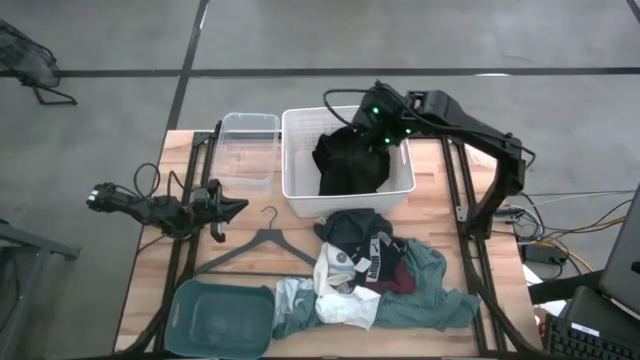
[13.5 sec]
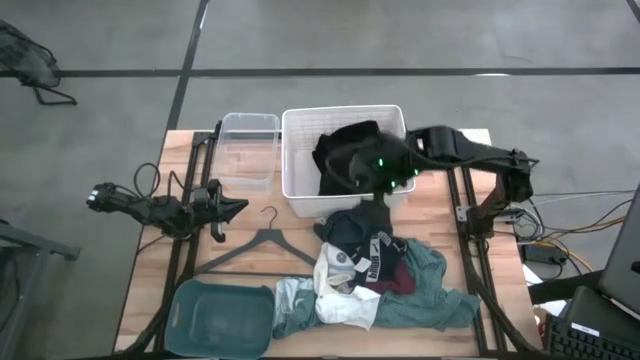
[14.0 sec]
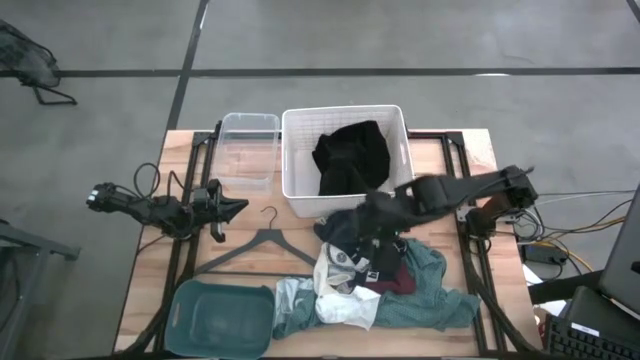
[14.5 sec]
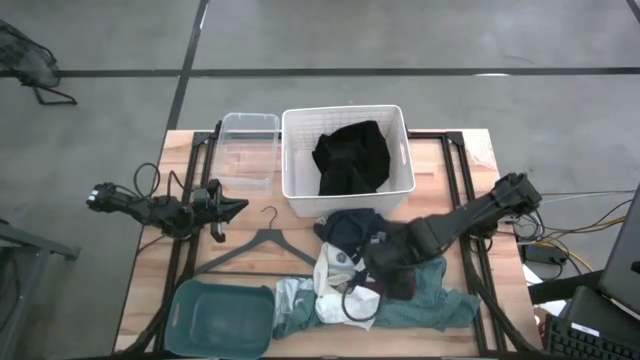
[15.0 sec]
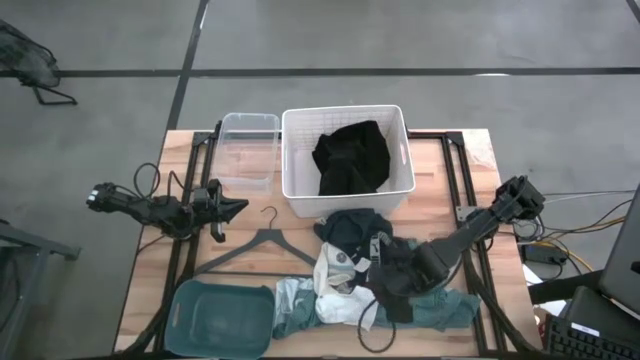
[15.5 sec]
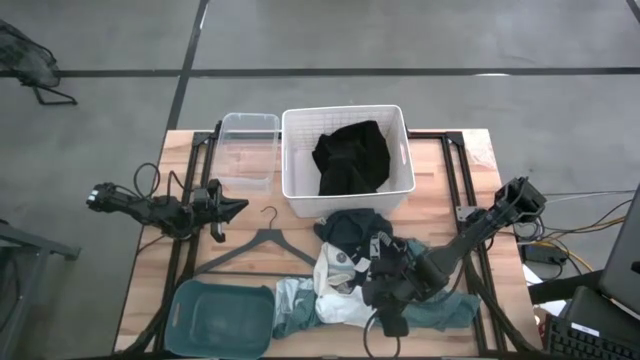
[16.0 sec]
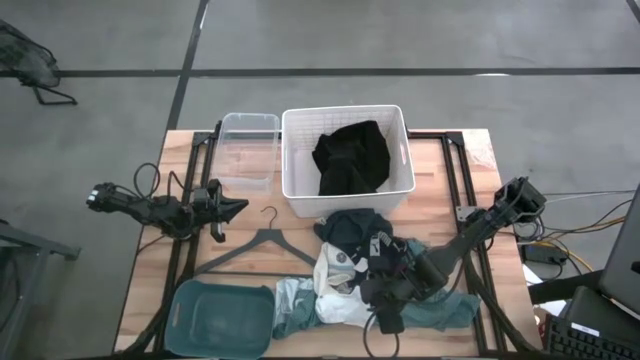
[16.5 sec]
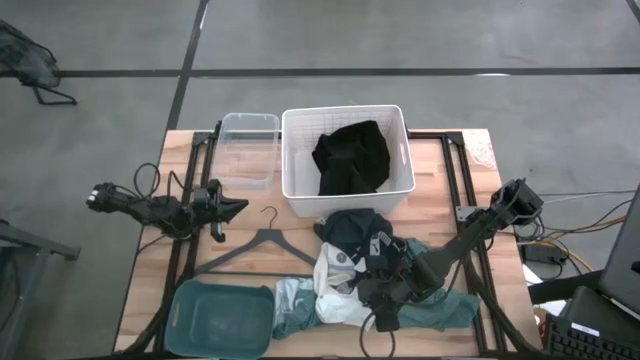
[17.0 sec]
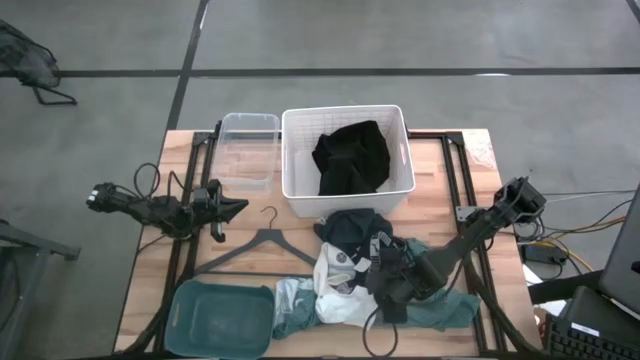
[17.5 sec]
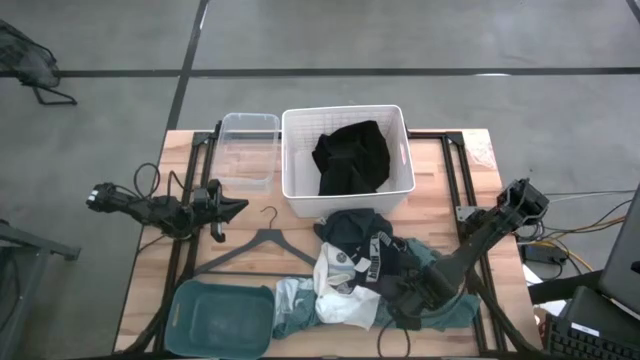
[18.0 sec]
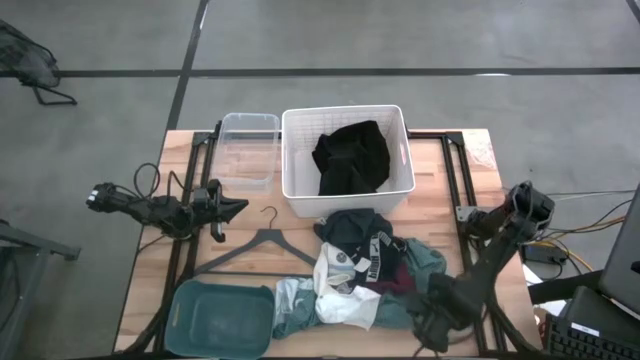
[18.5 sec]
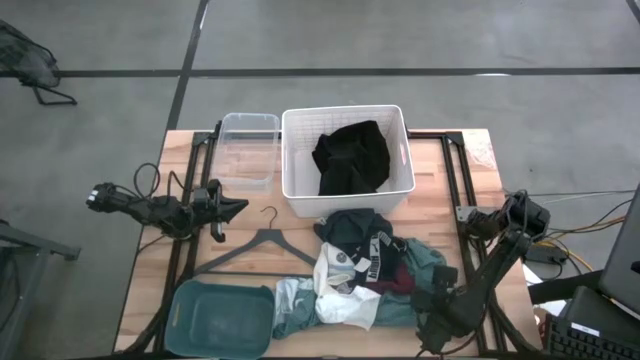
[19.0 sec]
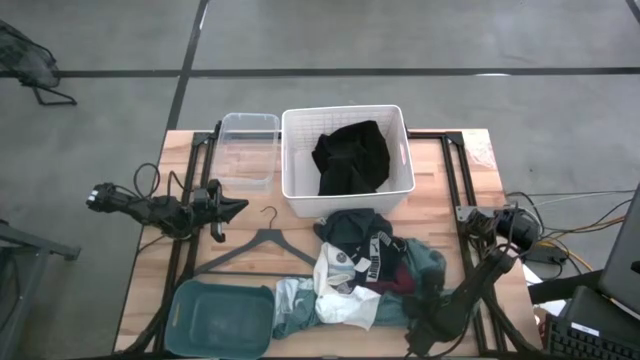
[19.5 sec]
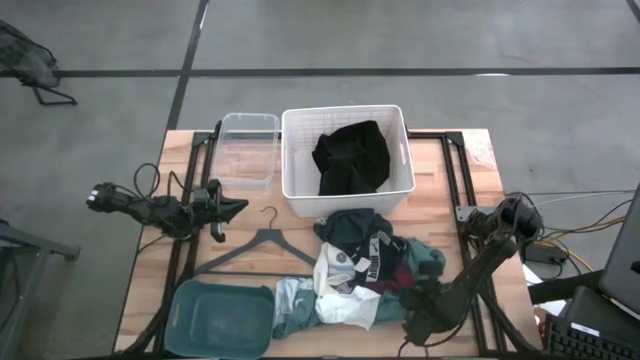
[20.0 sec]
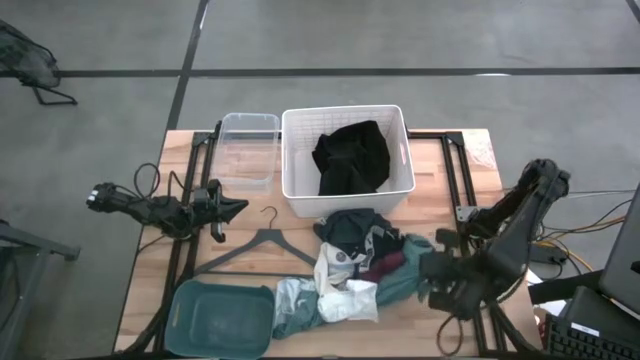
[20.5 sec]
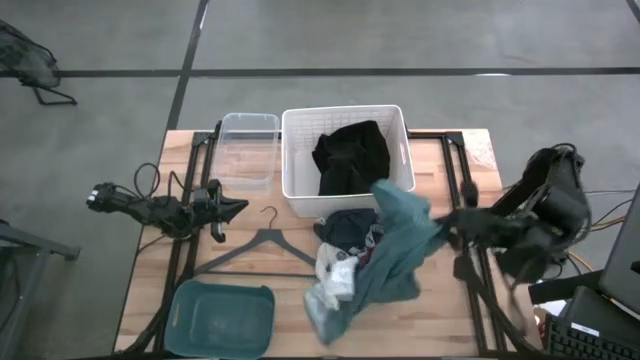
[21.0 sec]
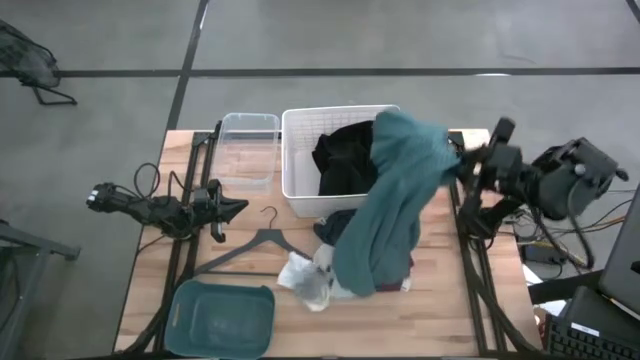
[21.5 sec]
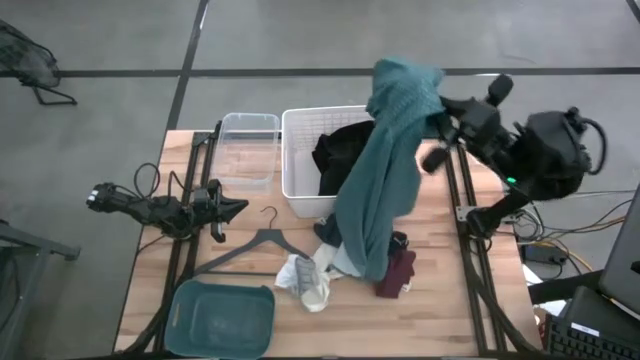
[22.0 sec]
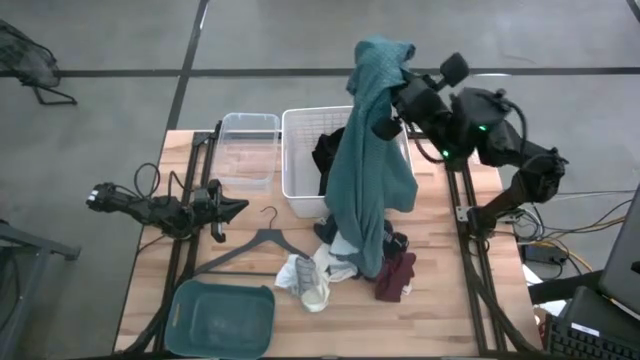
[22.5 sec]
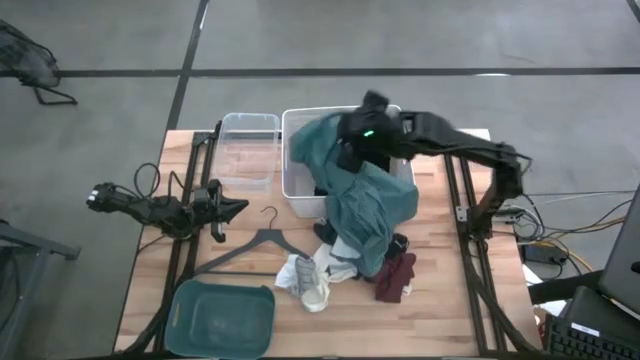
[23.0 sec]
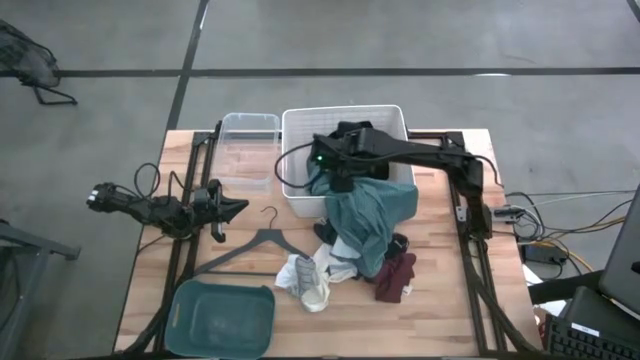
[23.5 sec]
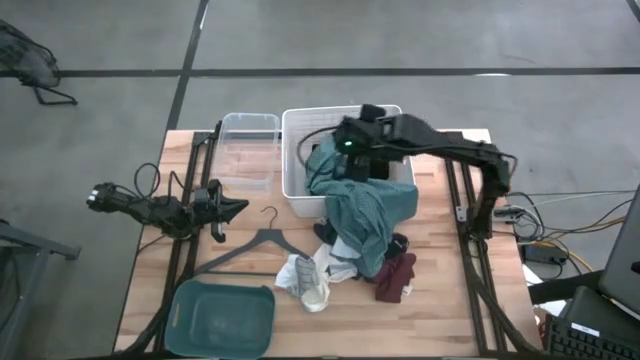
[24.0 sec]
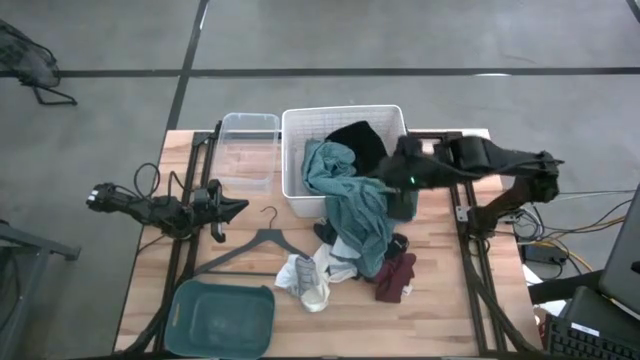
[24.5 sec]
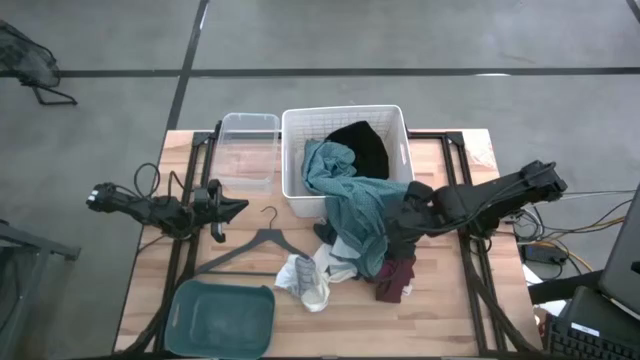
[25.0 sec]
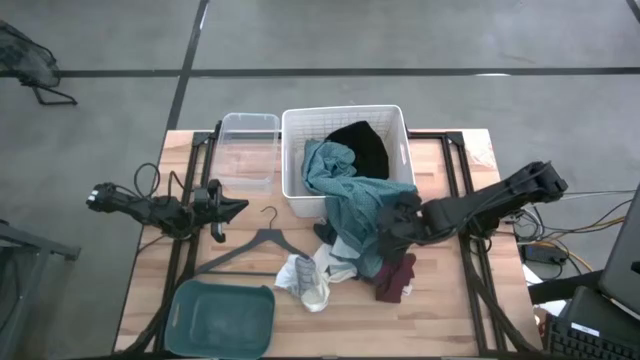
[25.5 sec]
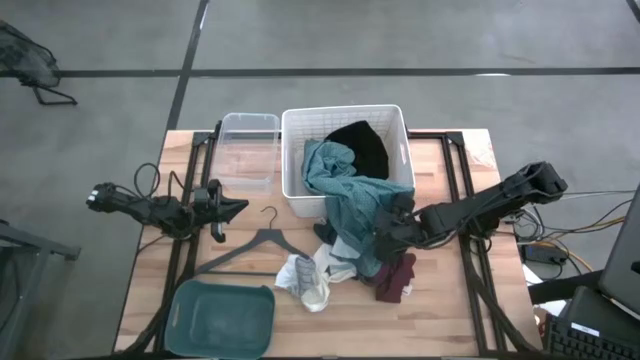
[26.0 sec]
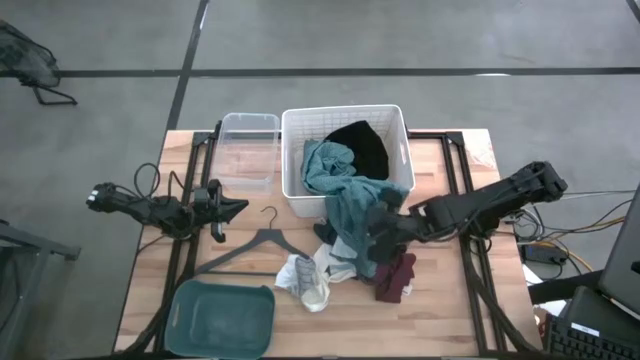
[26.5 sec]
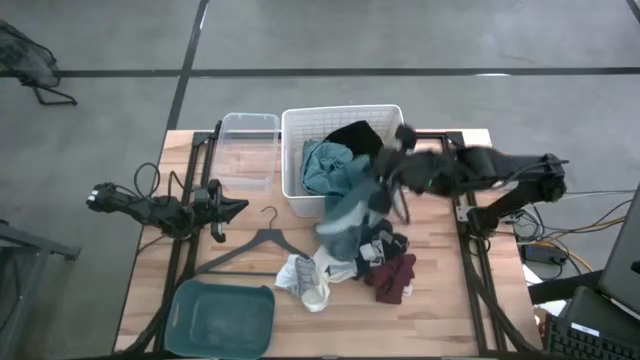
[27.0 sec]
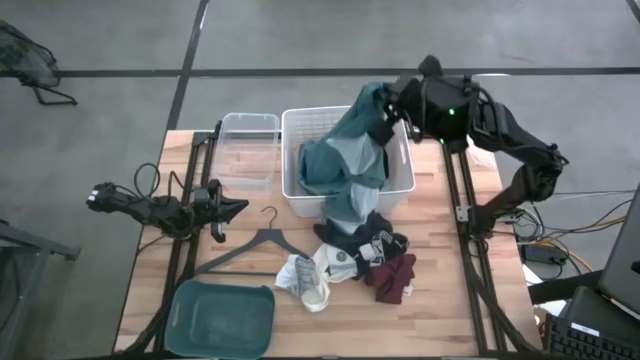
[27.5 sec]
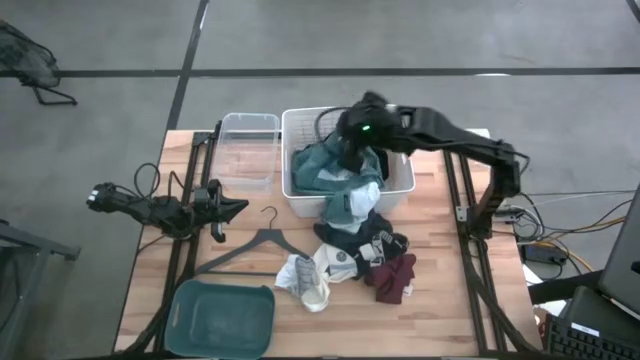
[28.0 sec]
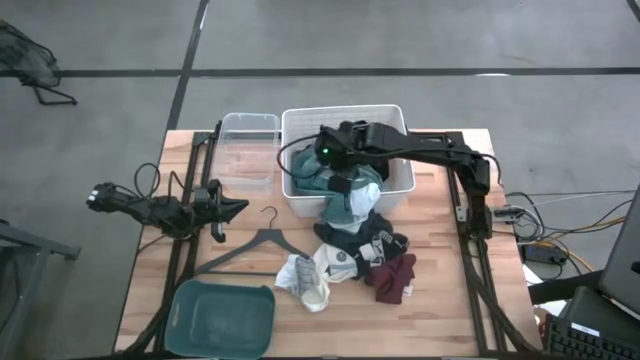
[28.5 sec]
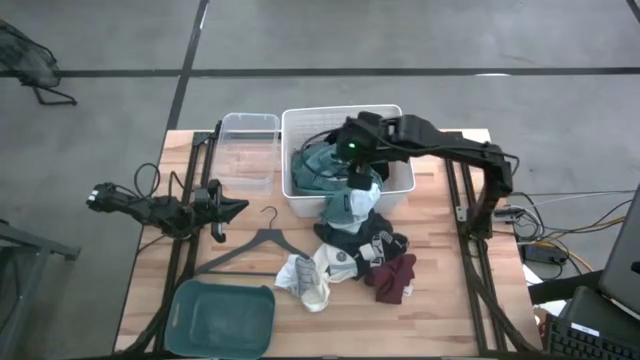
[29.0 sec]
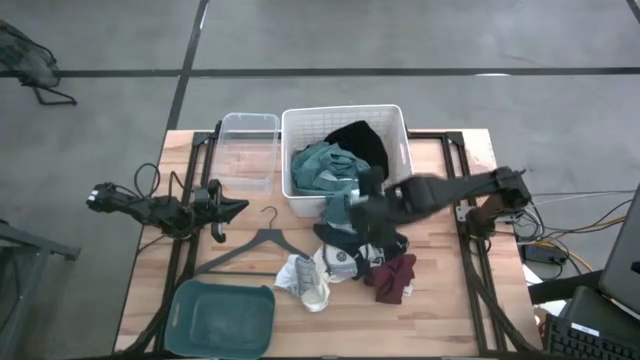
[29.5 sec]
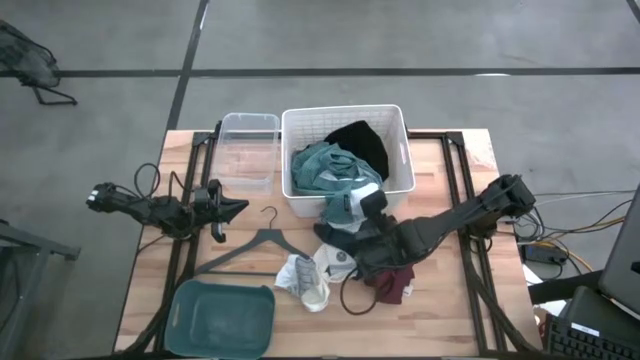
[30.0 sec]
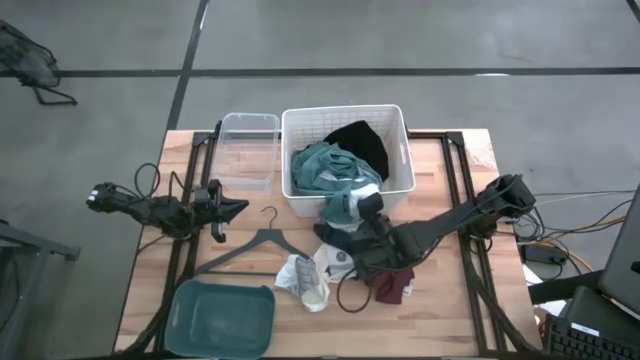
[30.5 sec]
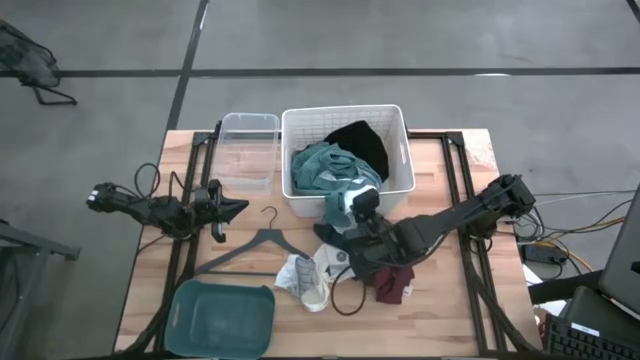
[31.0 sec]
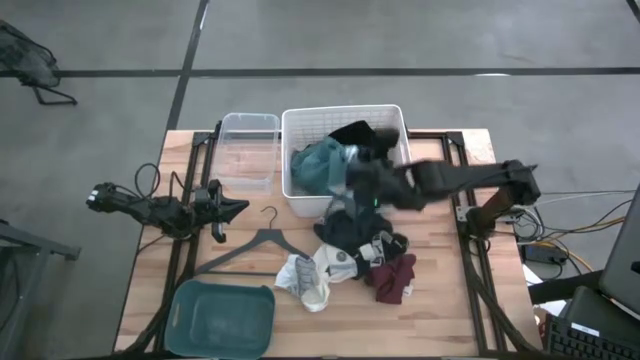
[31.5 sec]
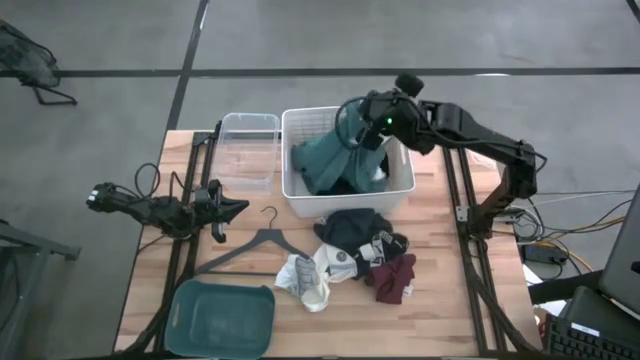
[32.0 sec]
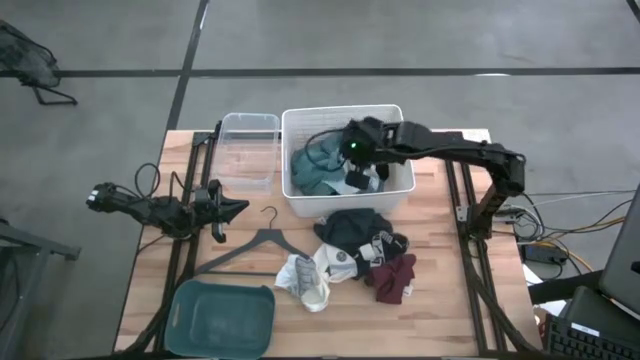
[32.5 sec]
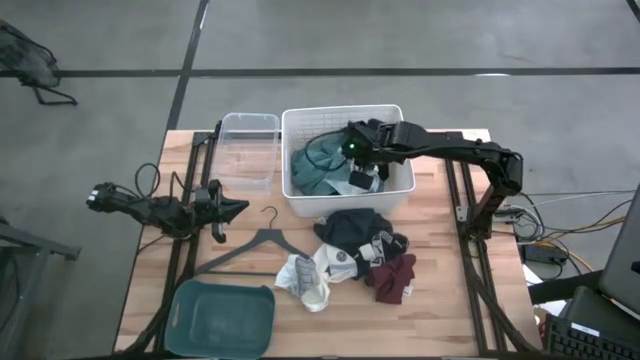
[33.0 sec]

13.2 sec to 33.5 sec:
Task: Pick & Place Cloths
Put the green shirt into the white bin

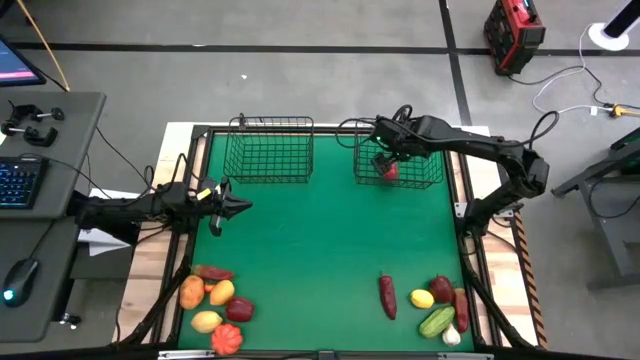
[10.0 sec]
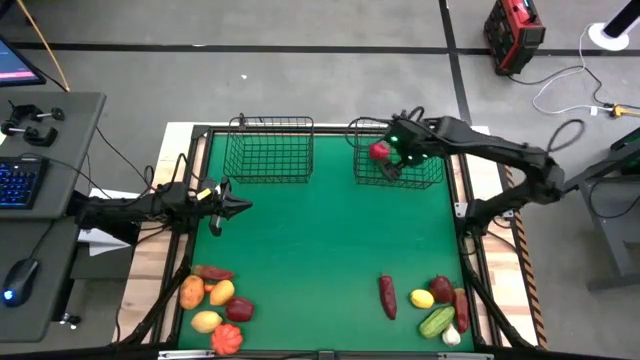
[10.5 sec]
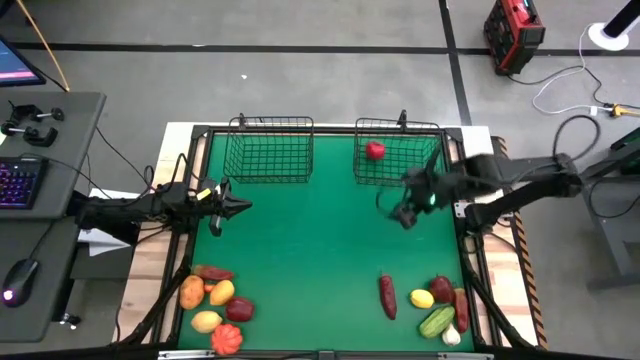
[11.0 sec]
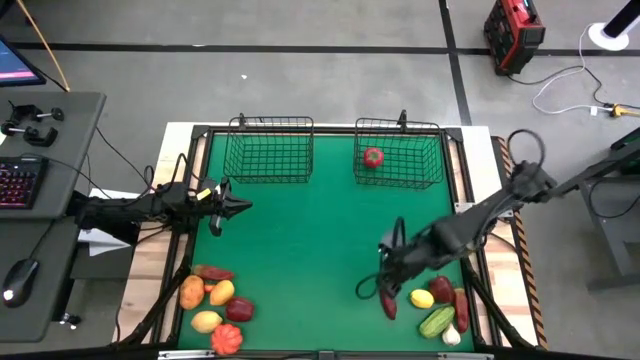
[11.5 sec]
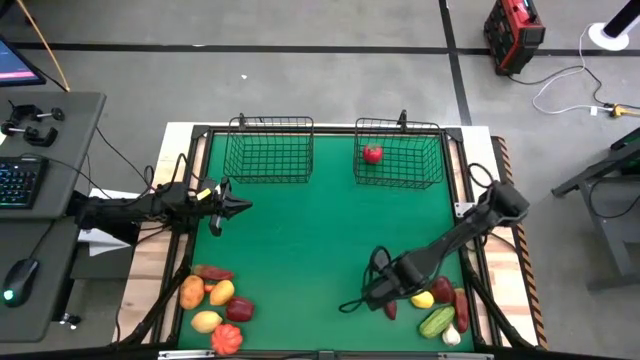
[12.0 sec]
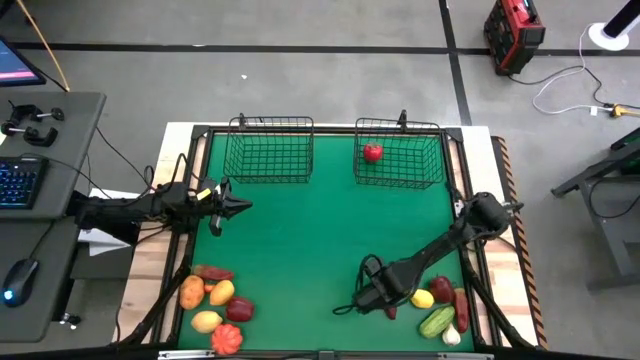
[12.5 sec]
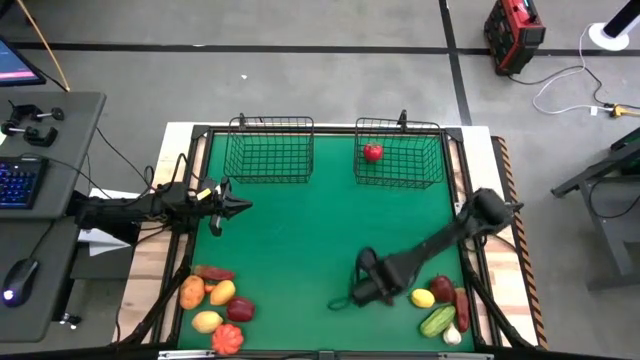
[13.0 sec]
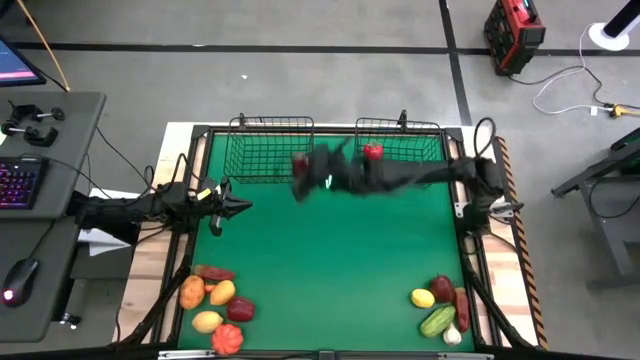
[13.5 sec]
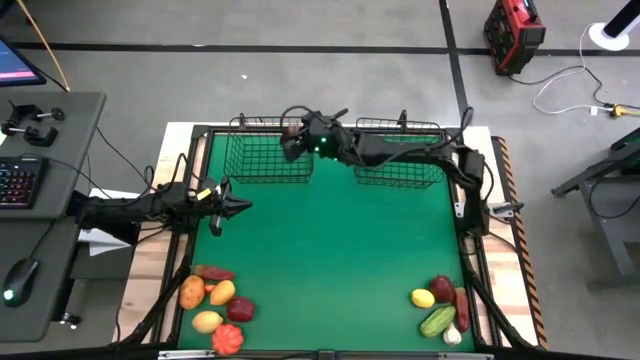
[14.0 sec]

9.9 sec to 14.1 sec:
Task: Sort produce into baskets
Put the middle red chili pepper into the left wire basket
